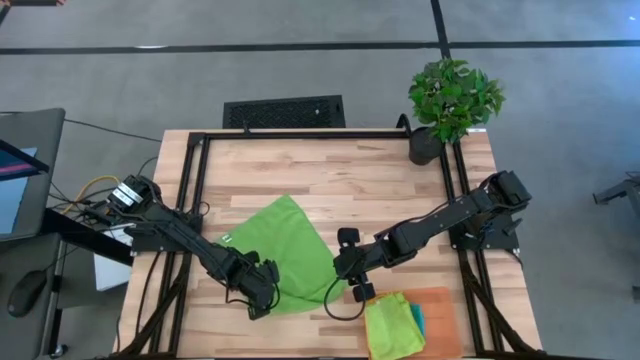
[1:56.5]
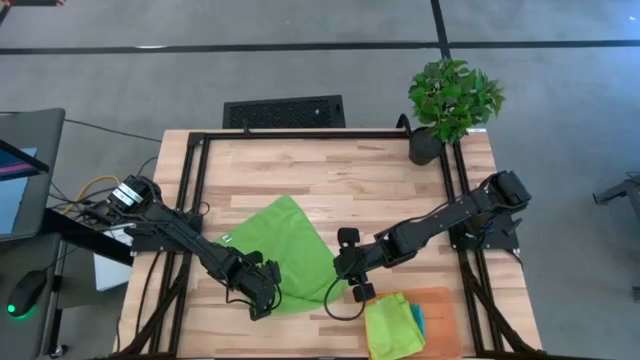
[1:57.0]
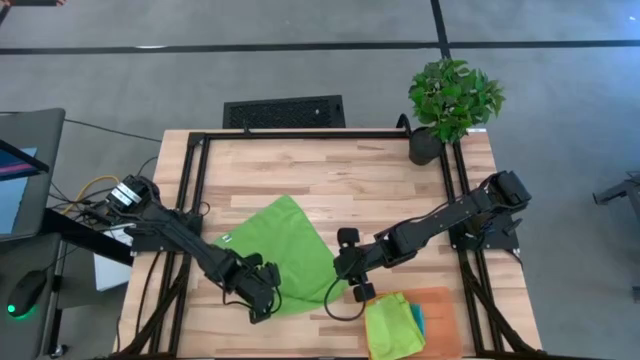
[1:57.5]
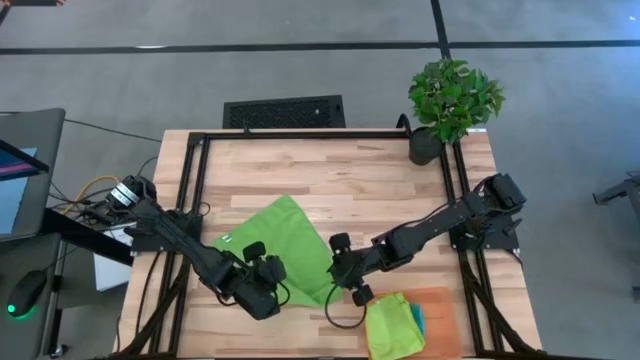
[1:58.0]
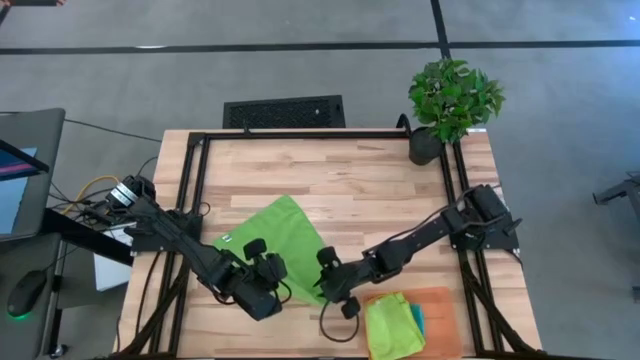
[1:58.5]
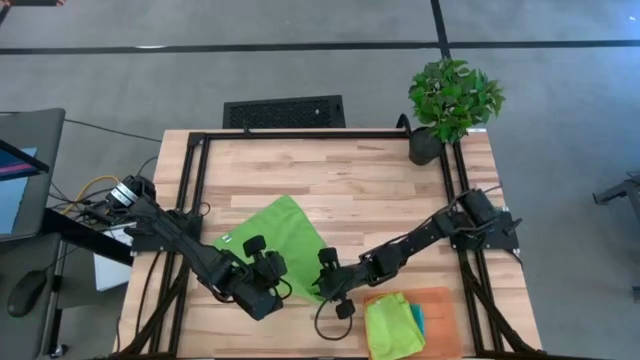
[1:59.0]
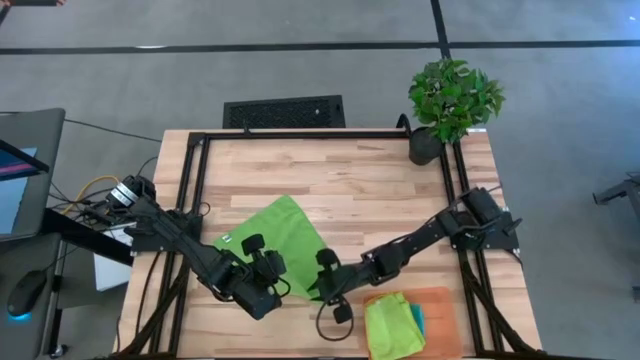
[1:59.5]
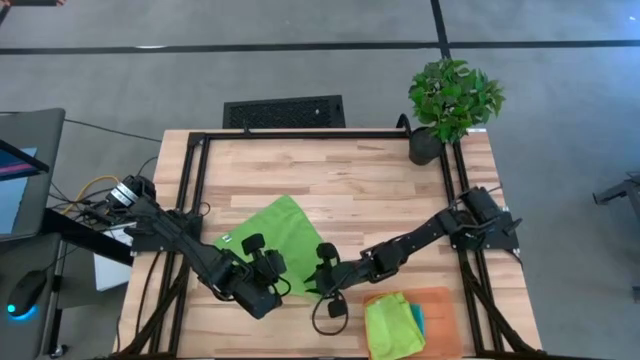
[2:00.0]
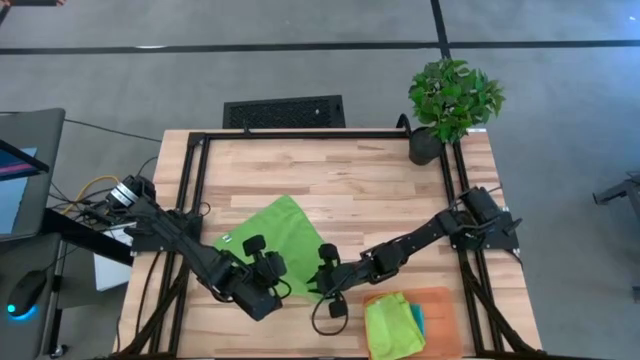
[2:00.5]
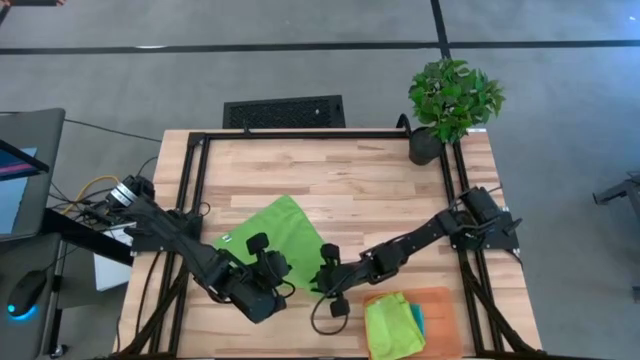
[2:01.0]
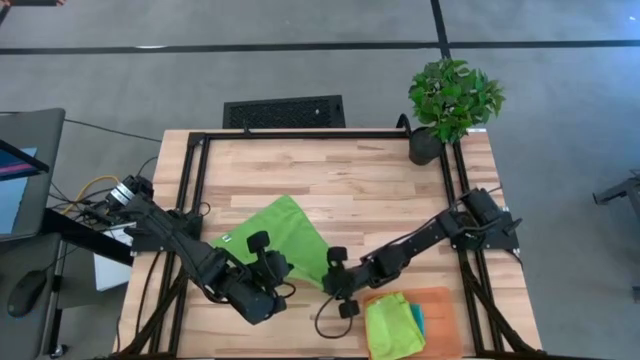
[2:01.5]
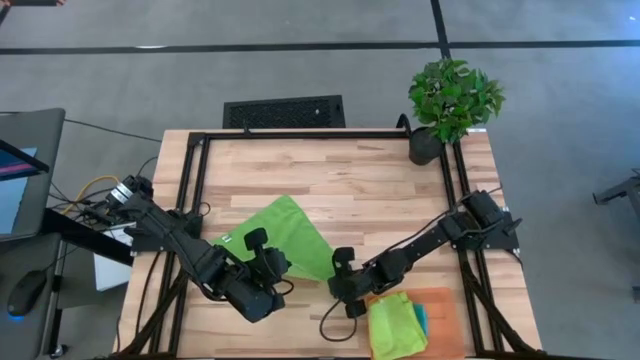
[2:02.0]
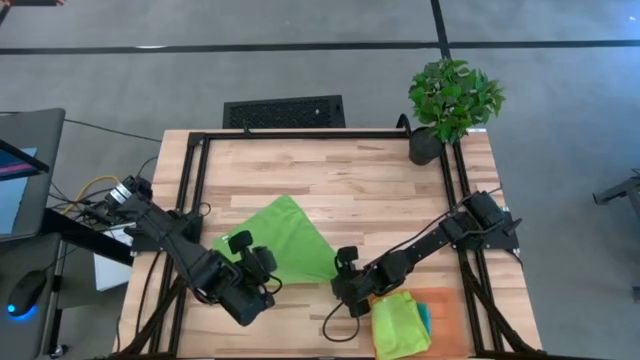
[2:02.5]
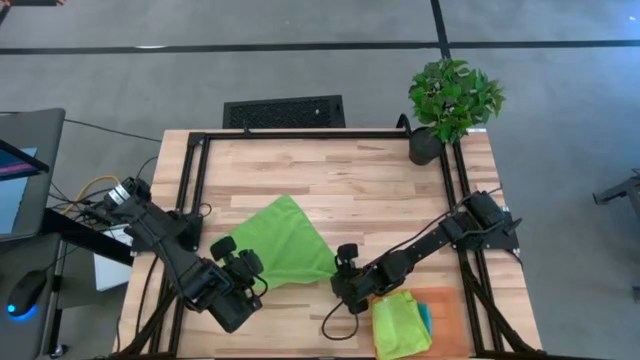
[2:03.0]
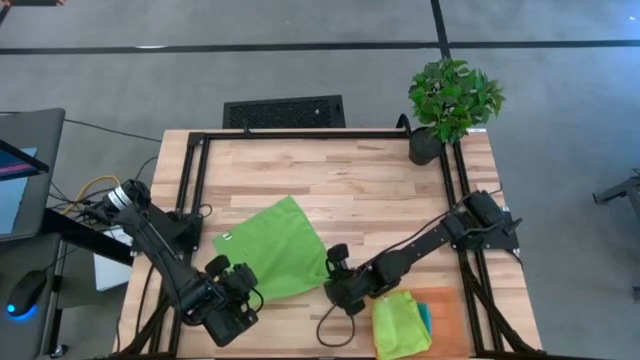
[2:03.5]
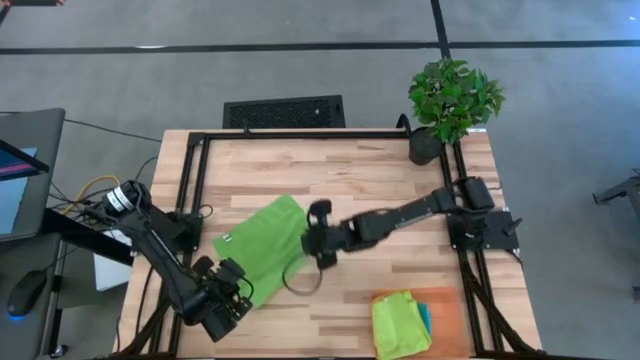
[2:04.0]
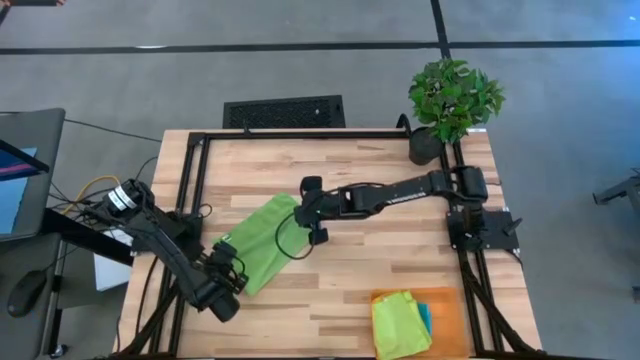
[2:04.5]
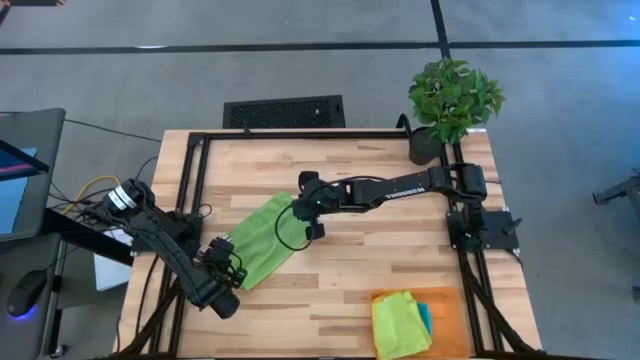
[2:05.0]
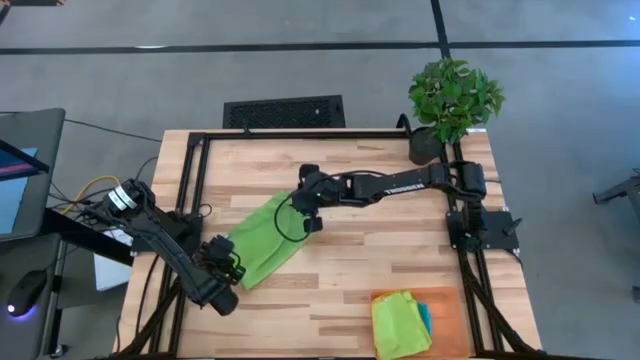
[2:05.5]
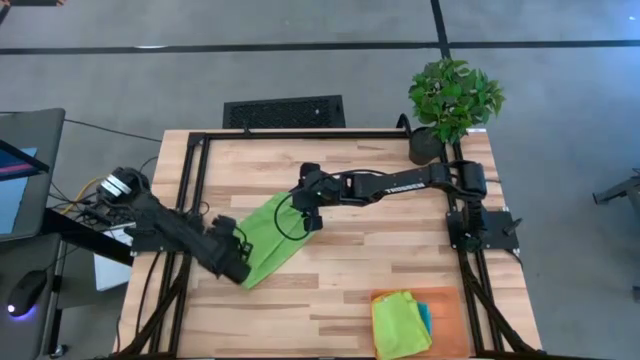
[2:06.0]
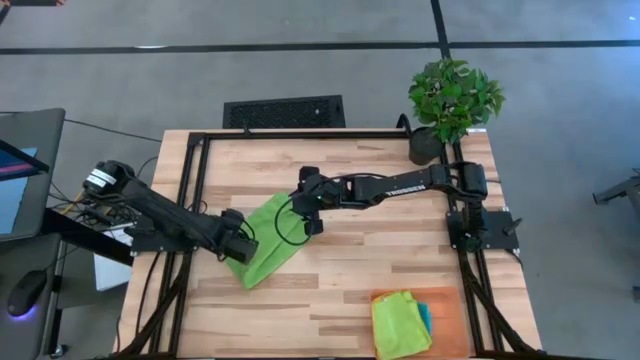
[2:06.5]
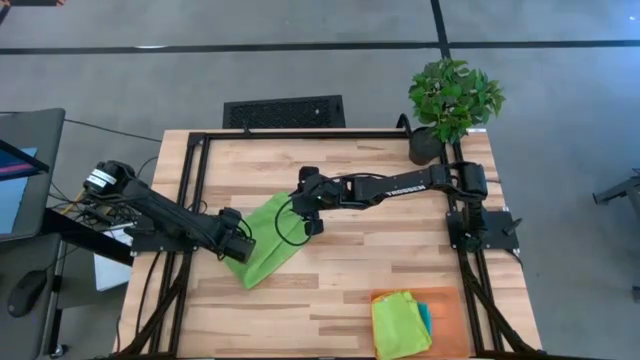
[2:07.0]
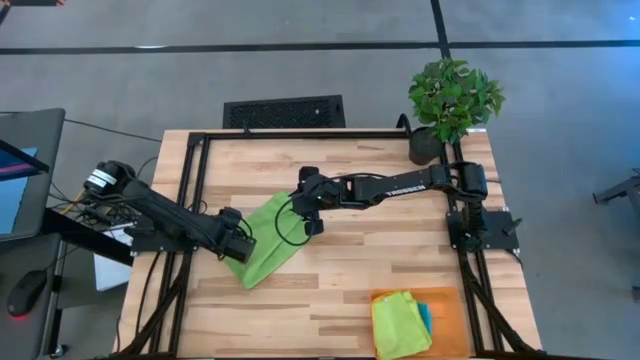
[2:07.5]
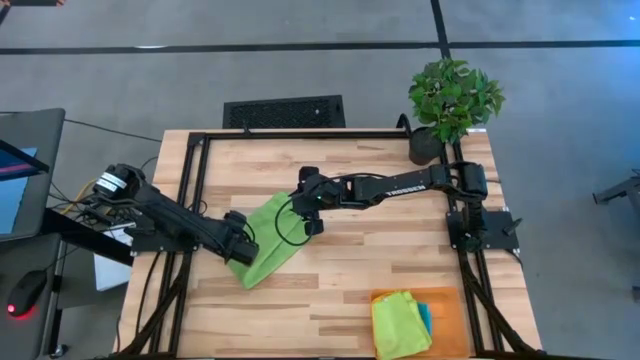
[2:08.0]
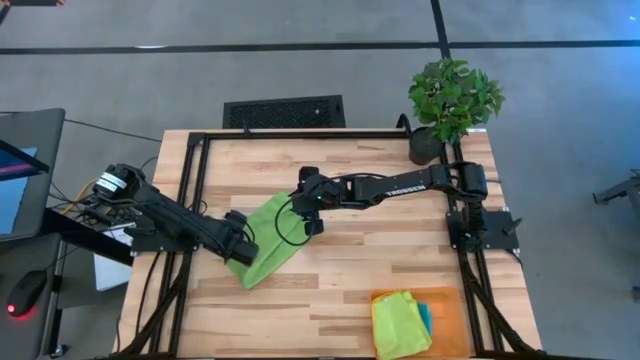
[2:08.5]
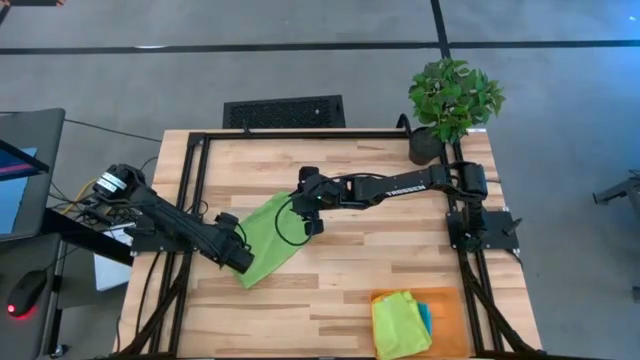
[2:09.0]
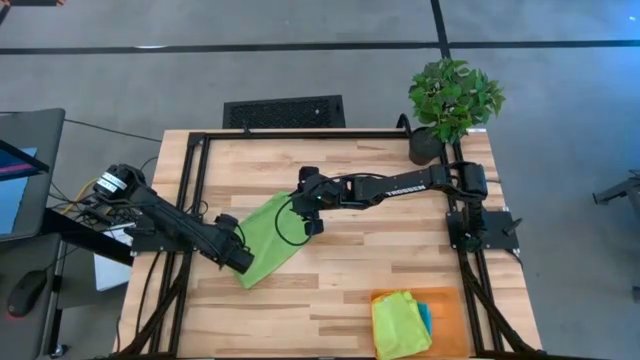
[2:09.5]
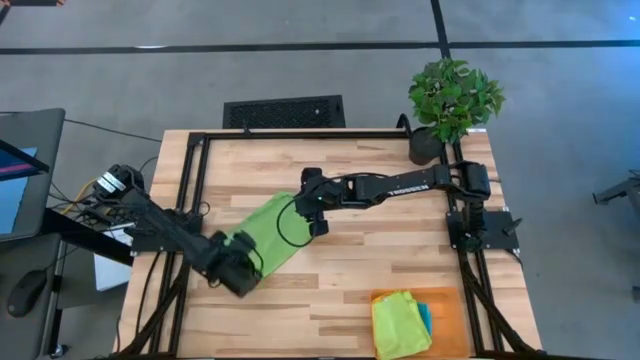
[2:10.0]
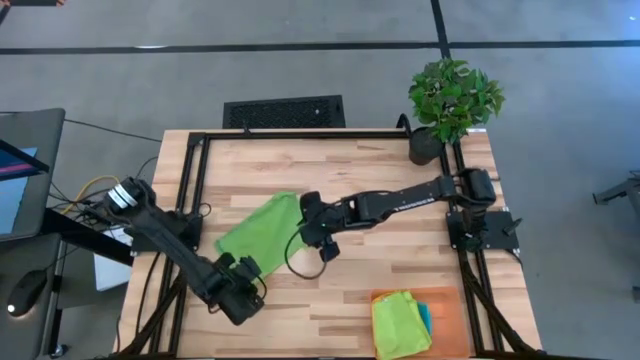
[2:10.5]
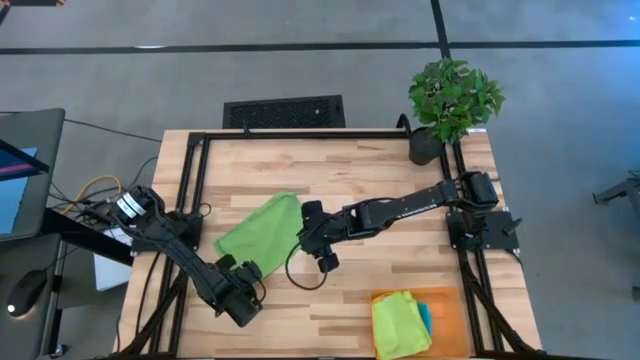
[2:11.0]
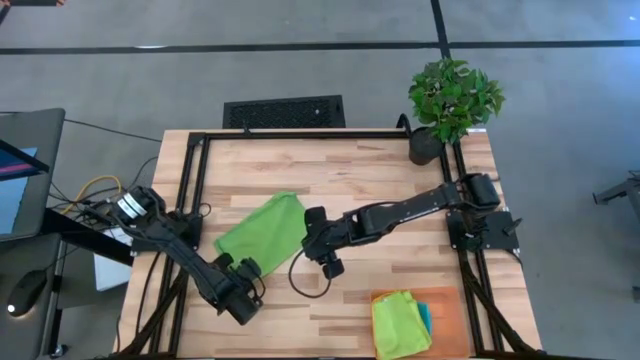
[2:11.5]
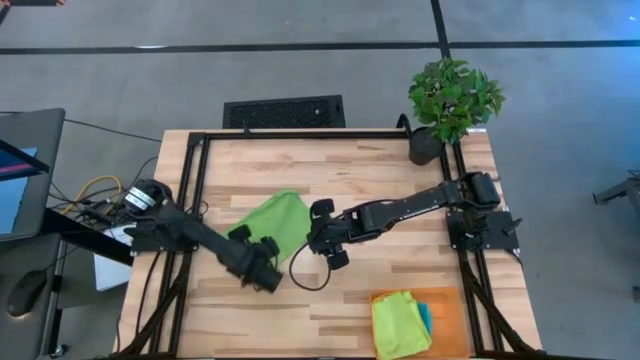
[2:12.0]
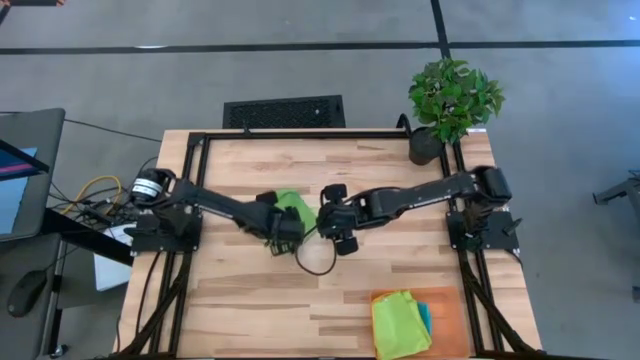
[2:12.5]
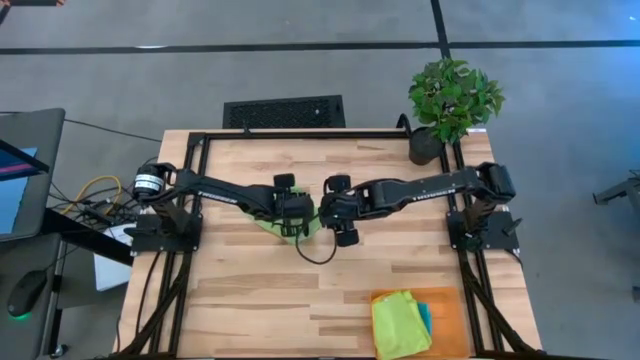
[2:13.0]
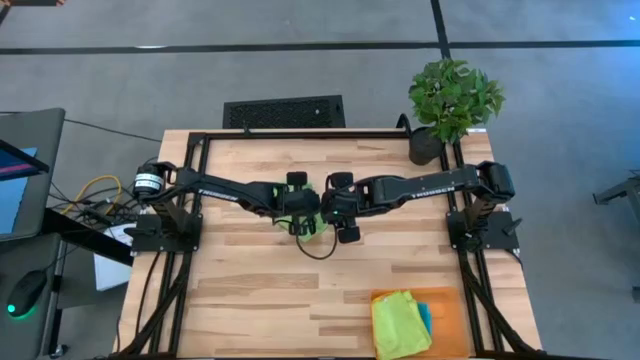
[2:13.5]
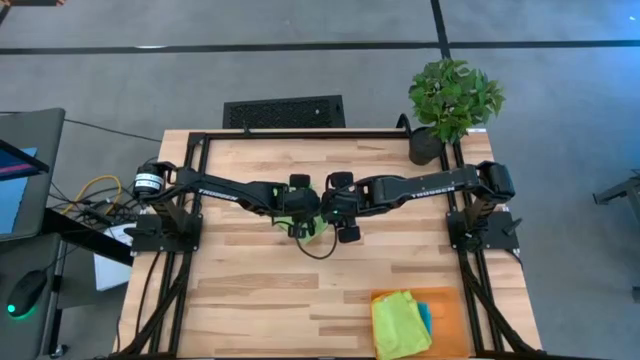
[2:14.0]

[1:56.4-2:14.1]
Task: Fold microfiber towels
Fold the green microfiber towel

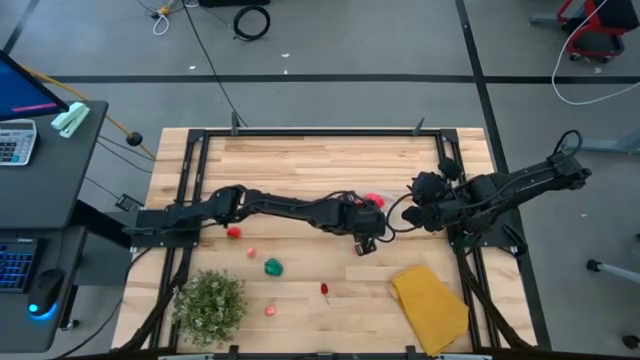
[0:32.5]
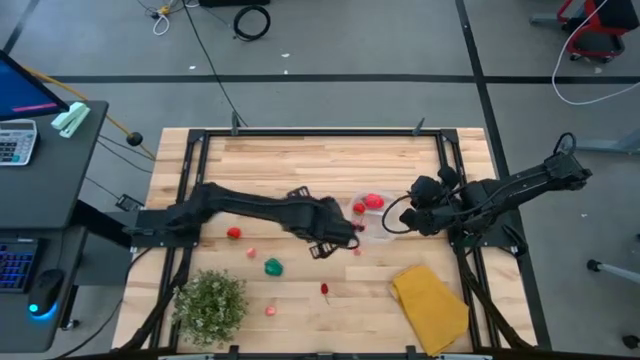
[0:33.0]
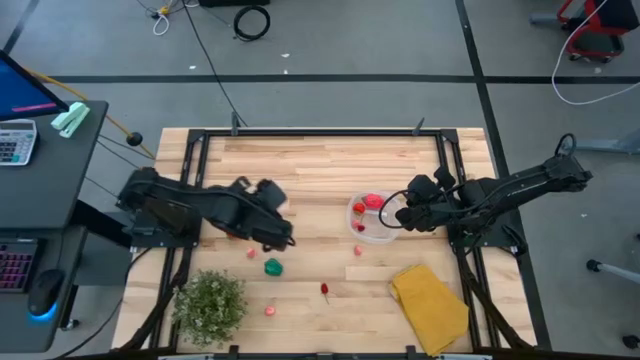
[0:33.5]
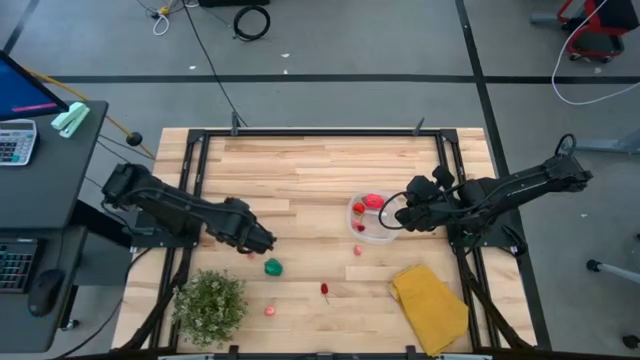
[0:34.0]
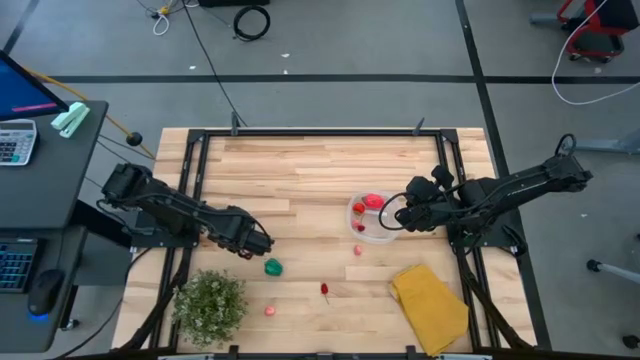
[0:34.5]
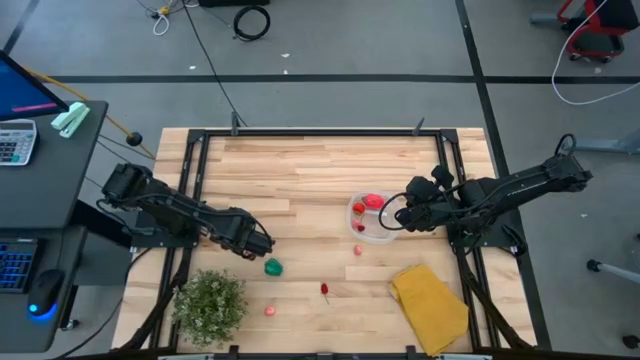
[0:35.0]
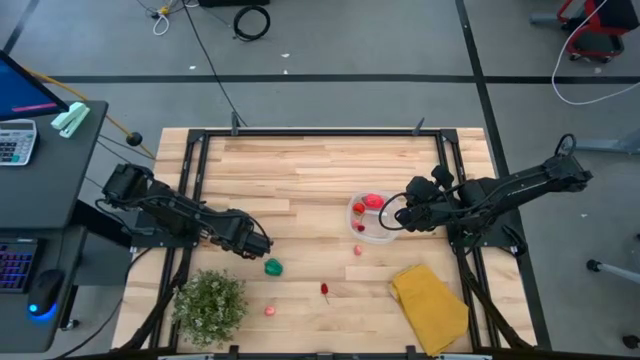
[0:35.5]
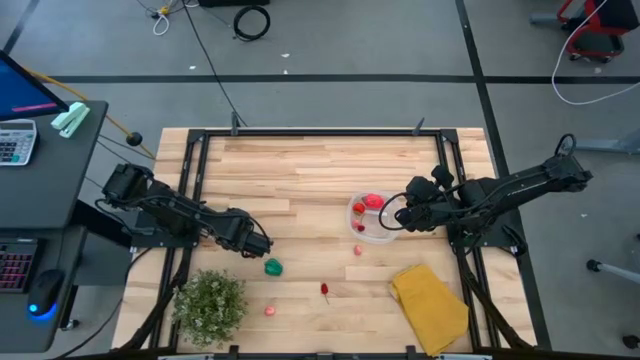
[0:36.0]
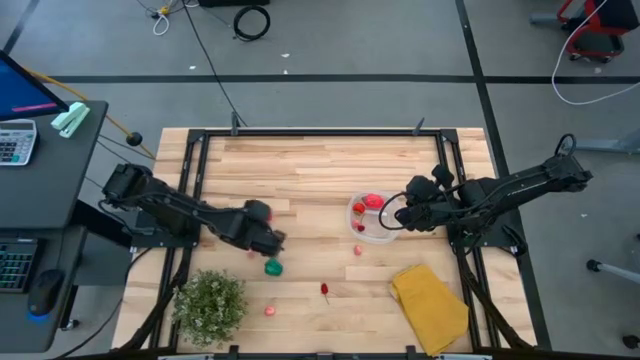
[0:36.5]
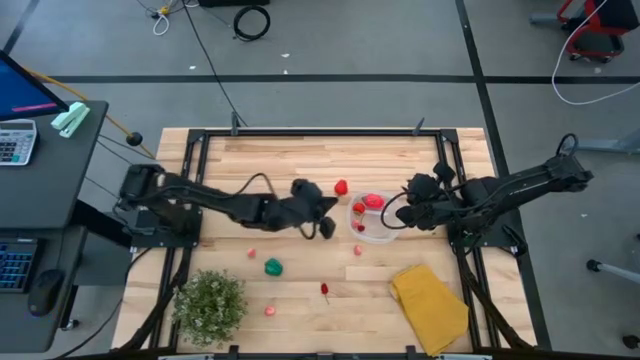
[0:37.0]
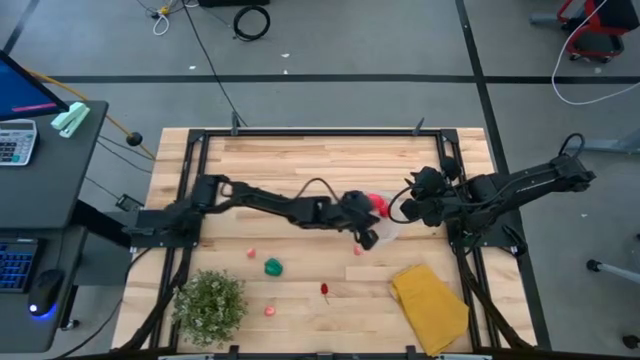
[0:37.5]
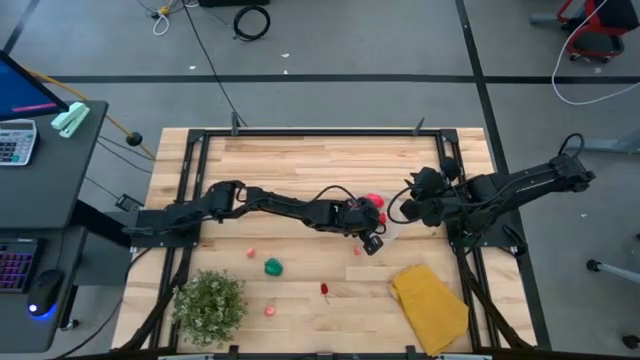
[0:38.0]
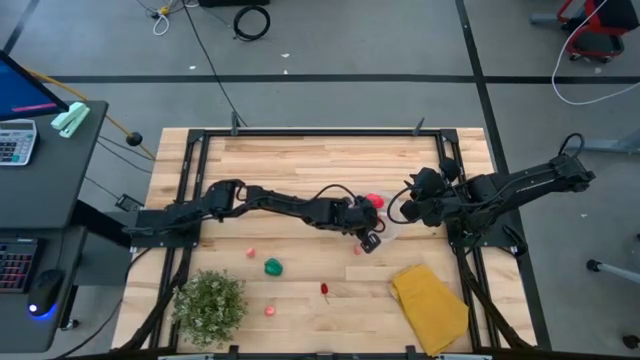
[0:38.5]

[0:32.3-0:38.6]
Task: Pick and placing Produce into tupperware
Put the red strawberry into the transparent container
